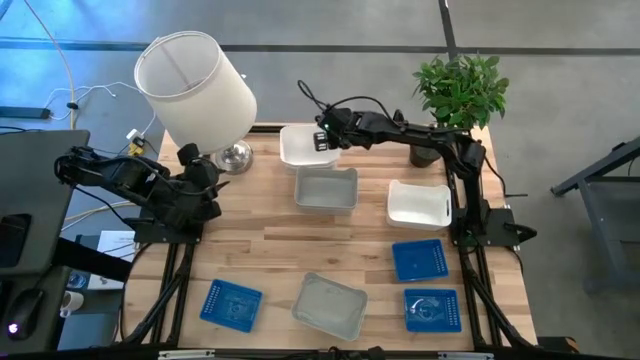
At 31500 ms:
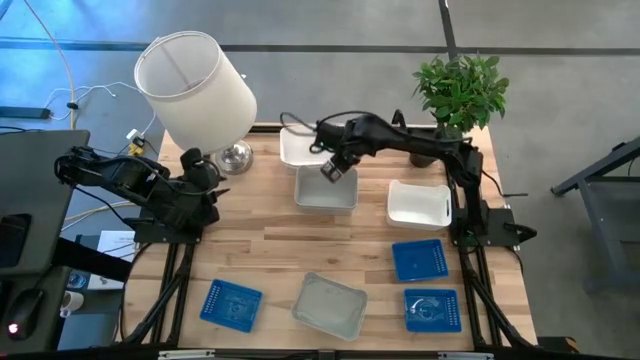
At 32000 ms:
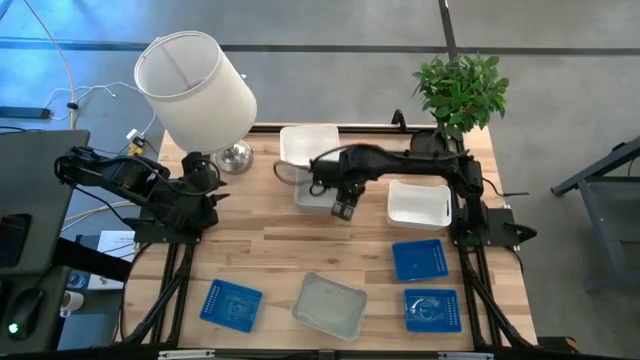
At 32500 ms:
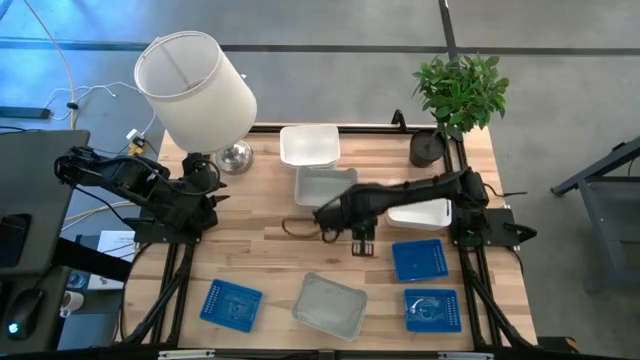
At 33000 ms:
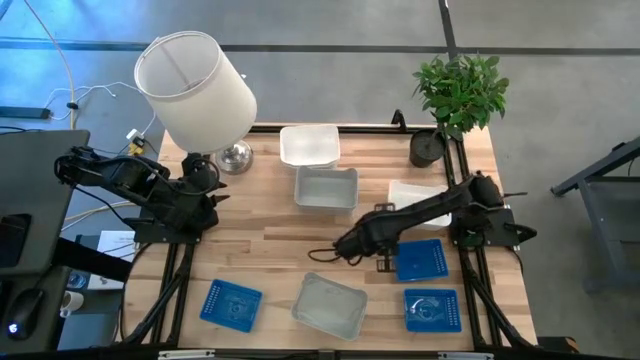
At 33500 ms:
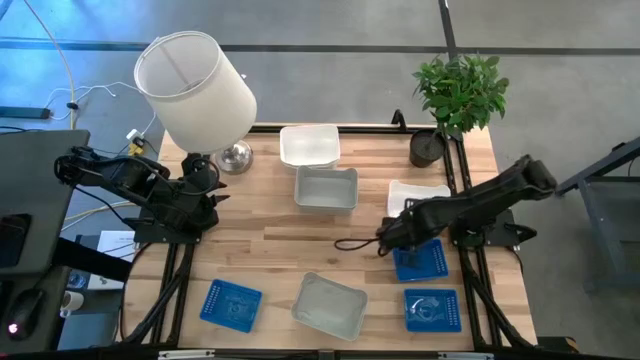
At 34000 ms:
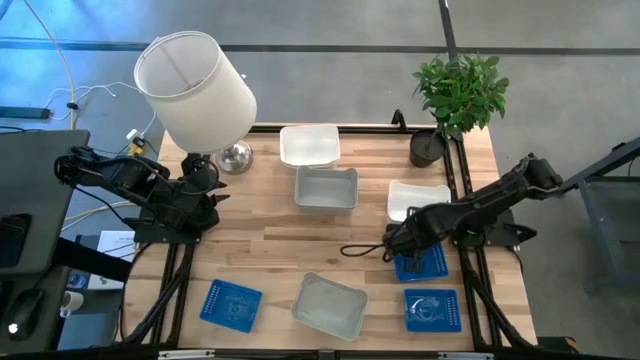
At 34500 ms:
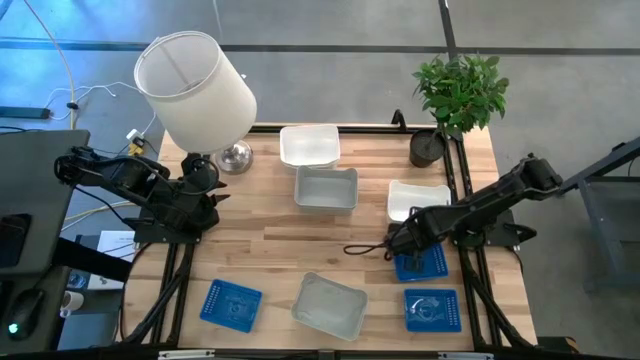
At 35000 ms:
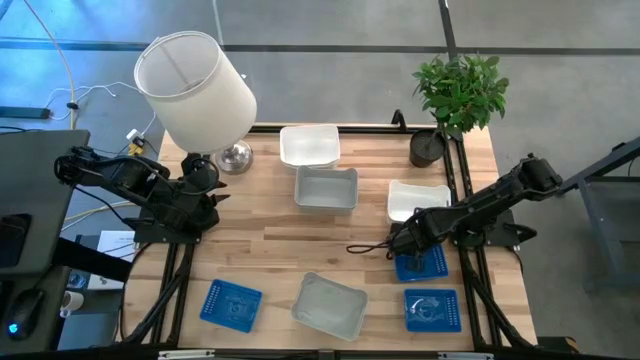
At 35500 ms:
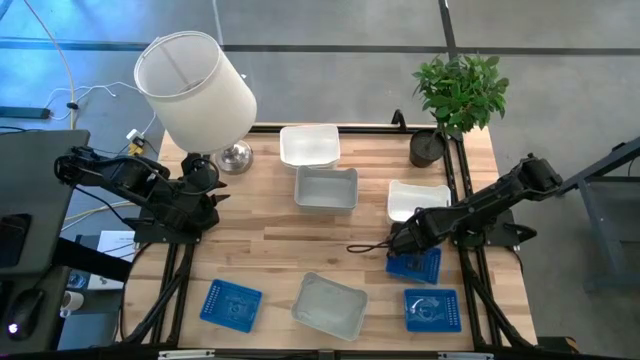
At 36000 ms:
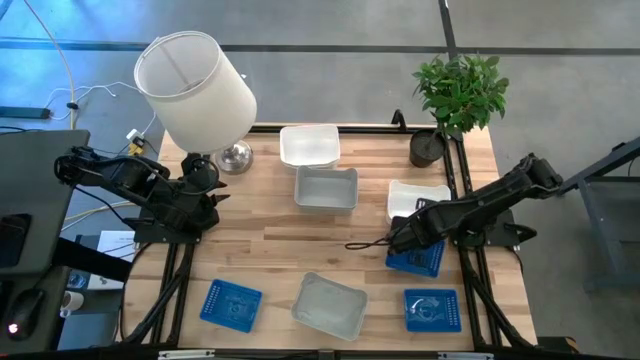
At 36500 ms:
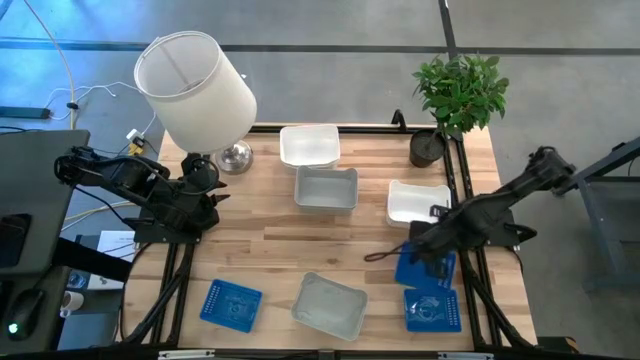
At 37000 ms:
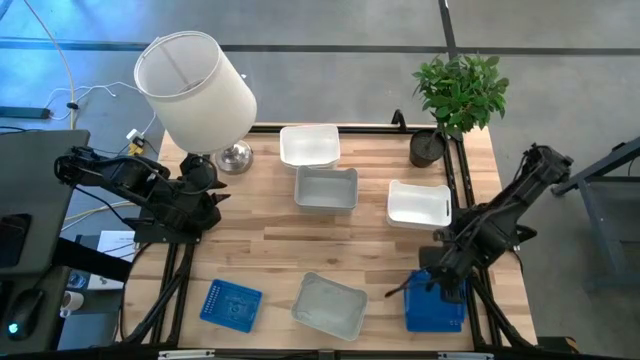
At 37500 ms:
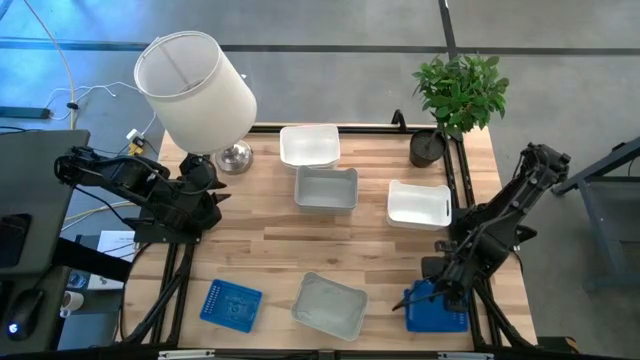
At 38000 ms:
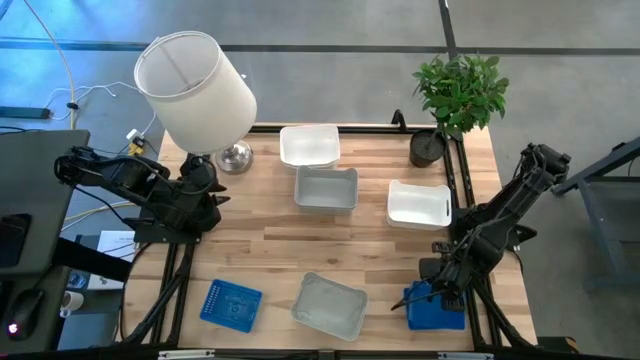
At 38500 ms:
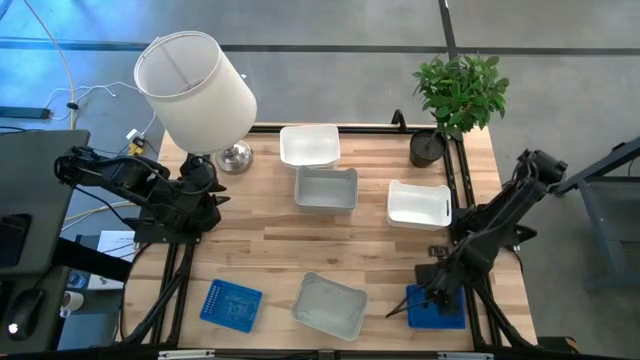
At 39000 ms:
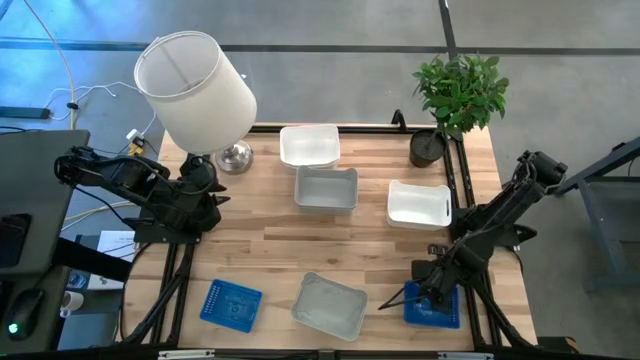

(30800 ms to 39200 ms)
Stack the blue bin on top of the bottom right blue bin

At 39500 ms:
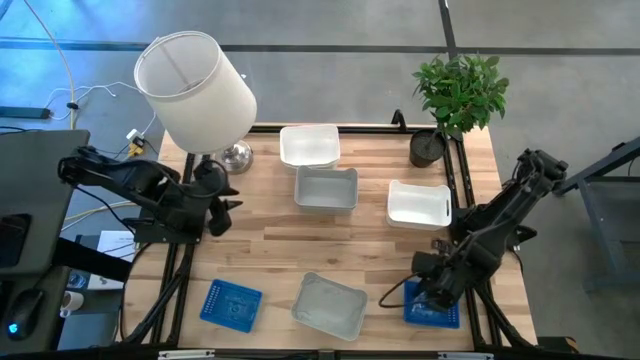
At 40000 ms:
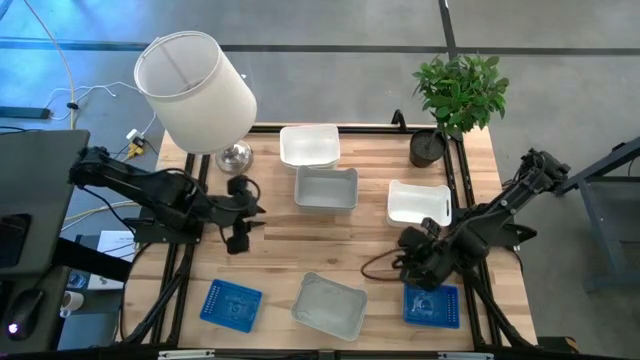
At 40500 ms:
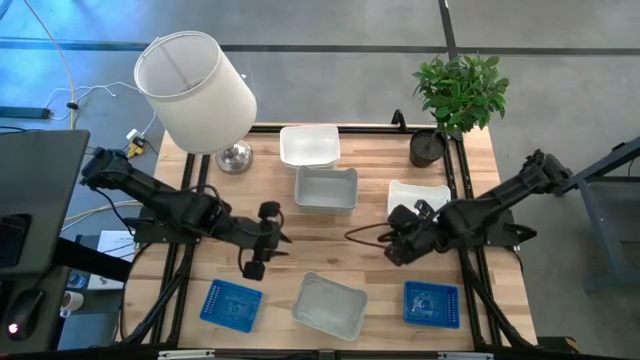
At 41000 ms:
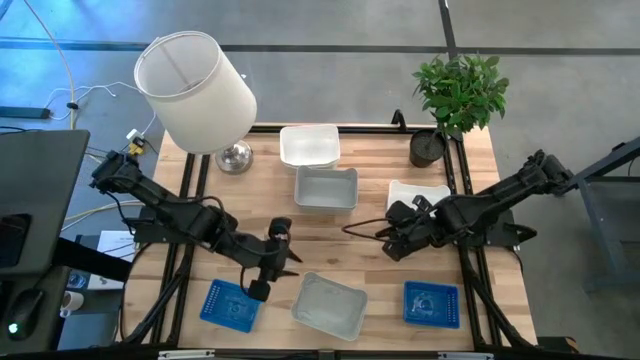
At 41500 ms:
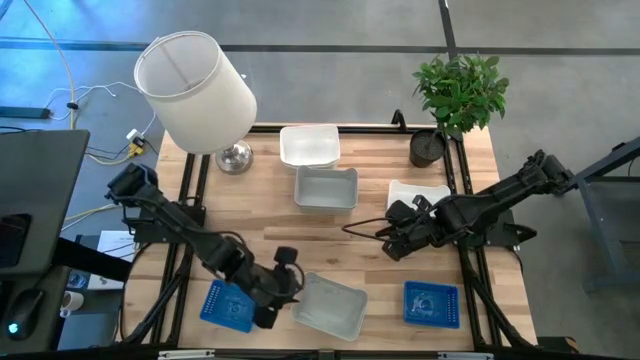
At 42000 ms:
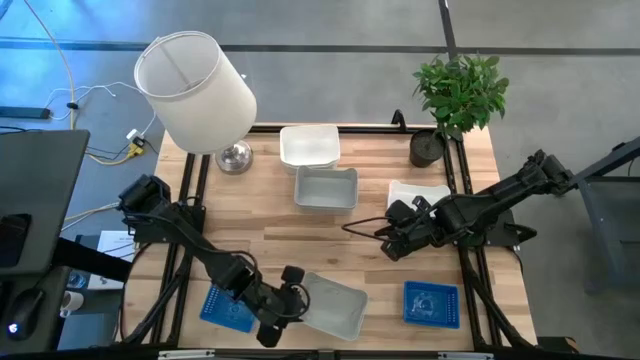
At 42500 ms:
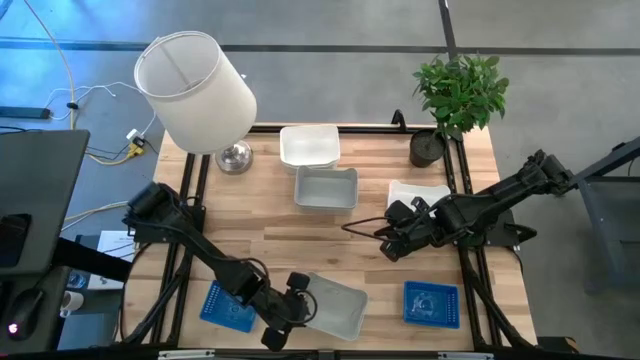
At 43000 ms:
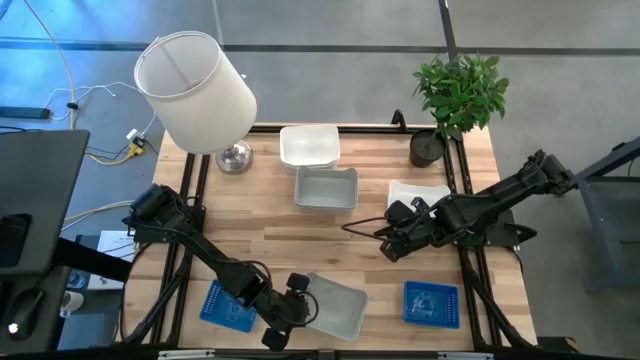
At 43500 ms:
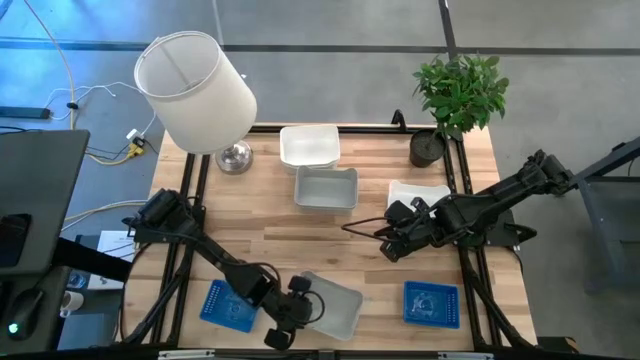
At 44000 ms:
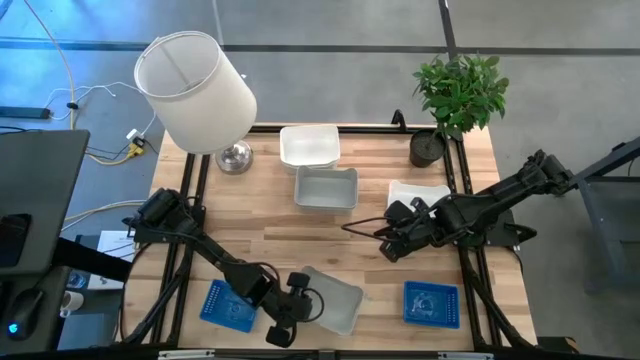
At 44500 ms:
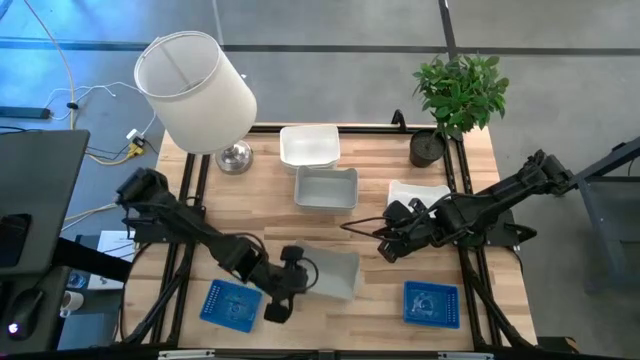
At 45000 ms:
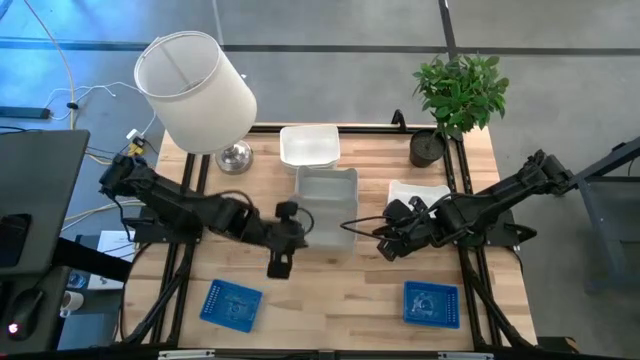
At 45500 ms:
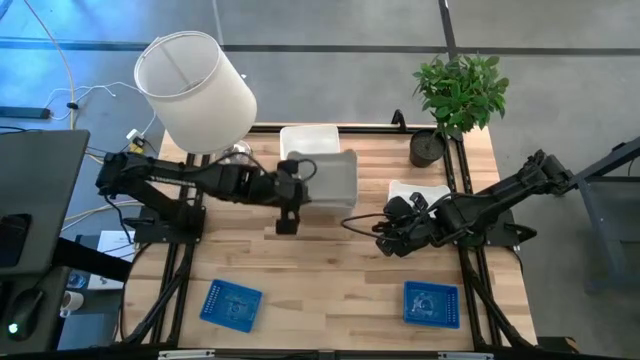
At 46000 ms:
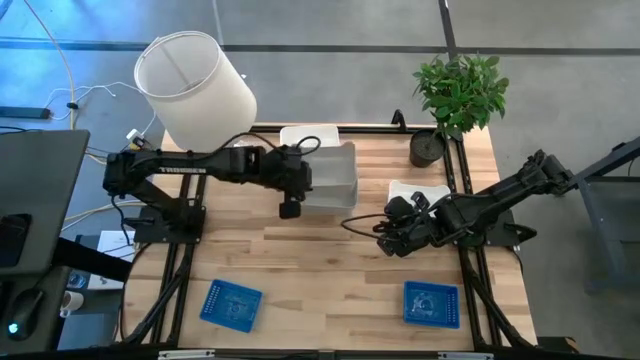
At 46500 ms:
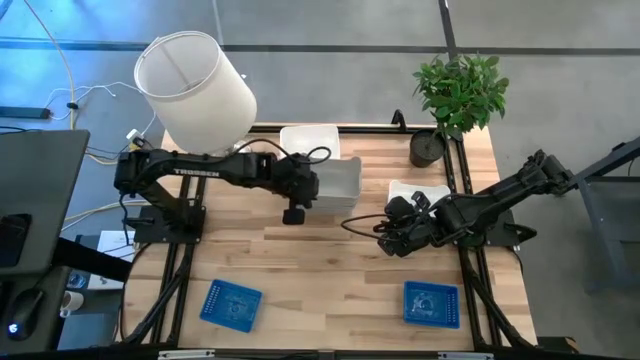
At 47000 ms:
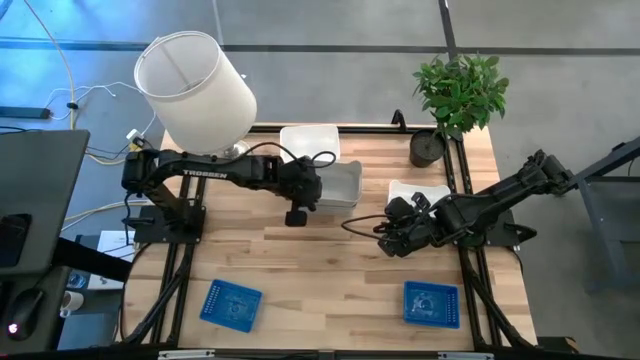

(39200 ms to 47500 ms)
Stack the bottom gray bin on top of the top gray bins

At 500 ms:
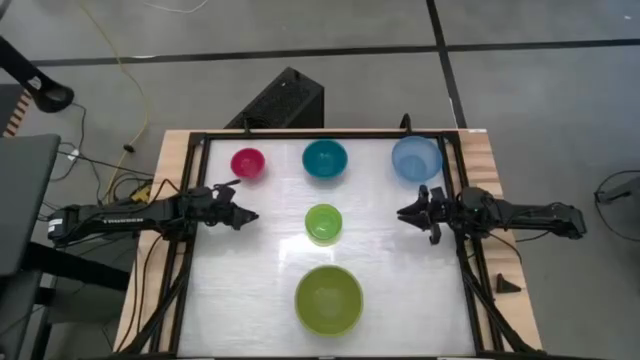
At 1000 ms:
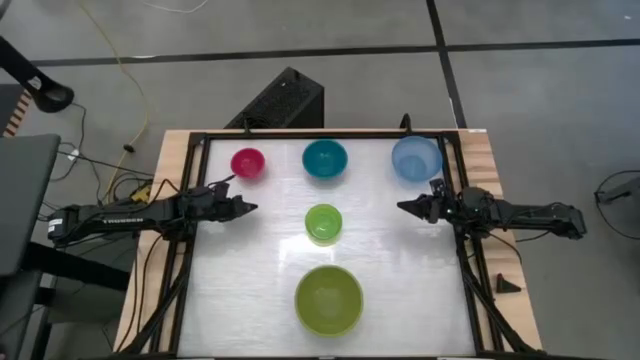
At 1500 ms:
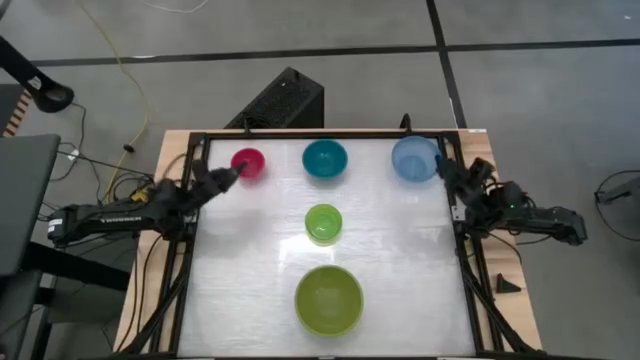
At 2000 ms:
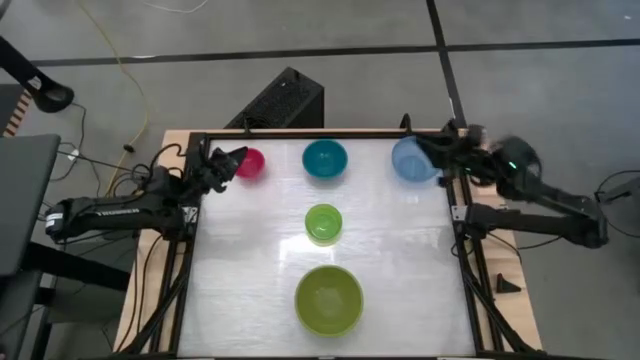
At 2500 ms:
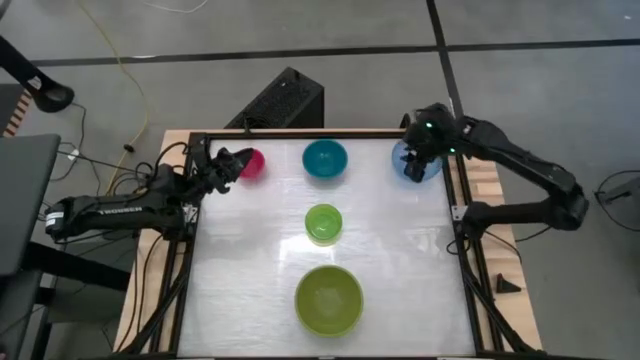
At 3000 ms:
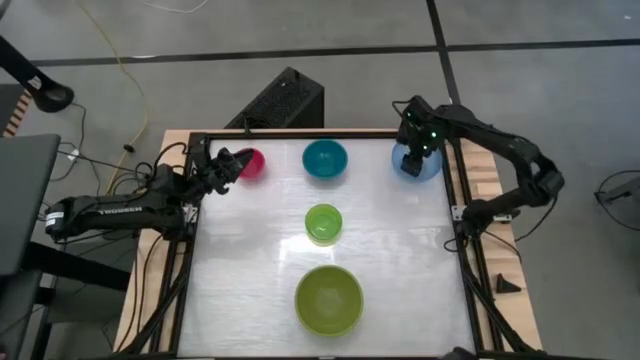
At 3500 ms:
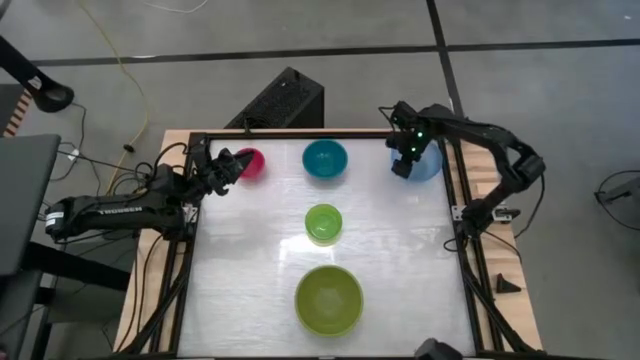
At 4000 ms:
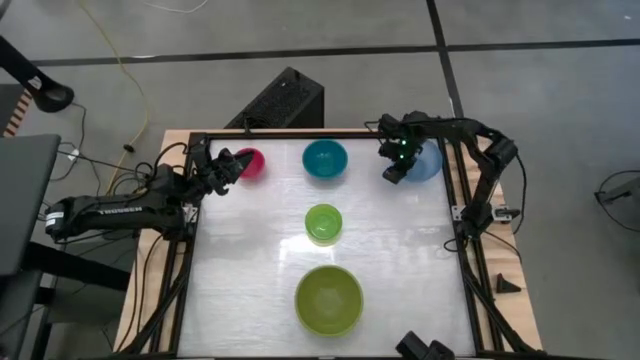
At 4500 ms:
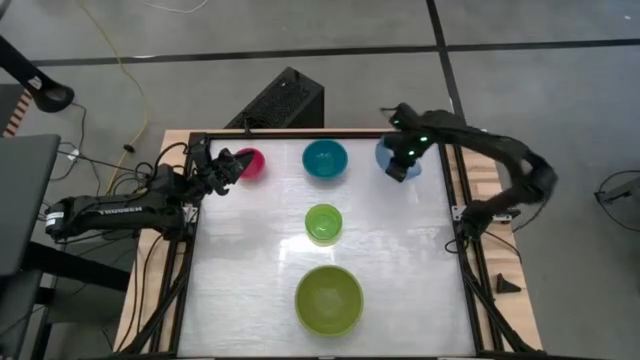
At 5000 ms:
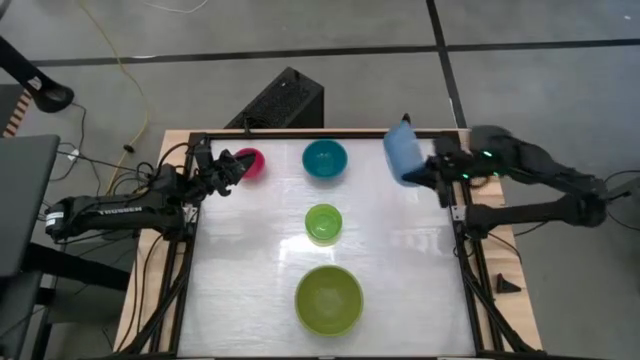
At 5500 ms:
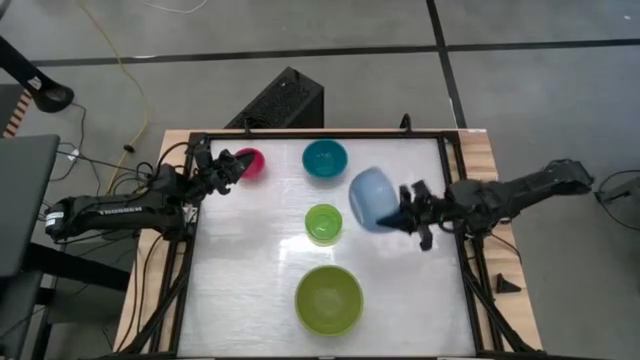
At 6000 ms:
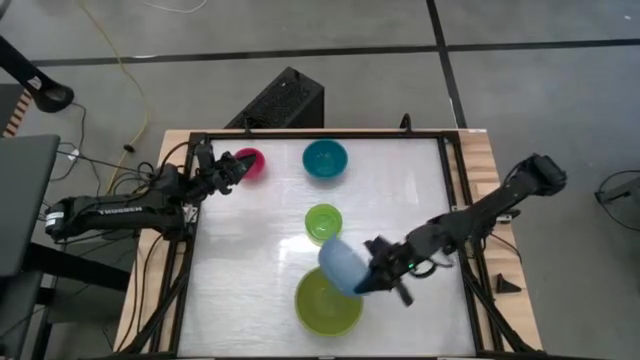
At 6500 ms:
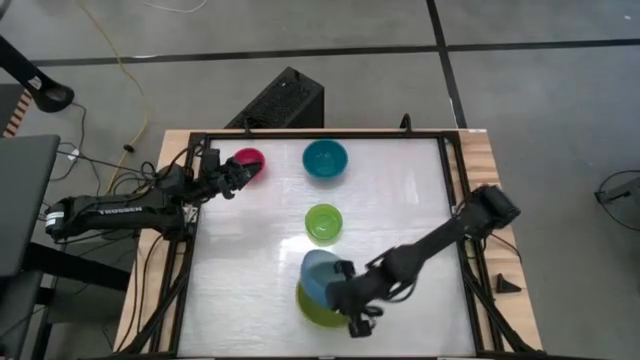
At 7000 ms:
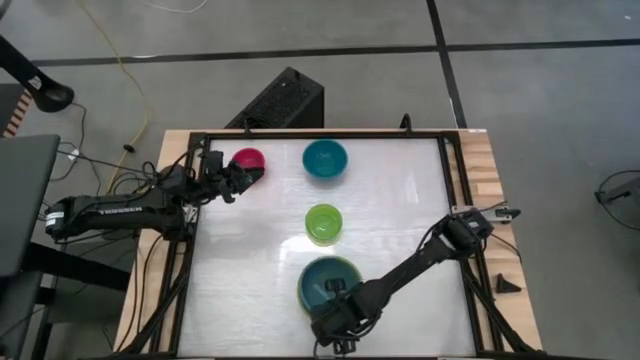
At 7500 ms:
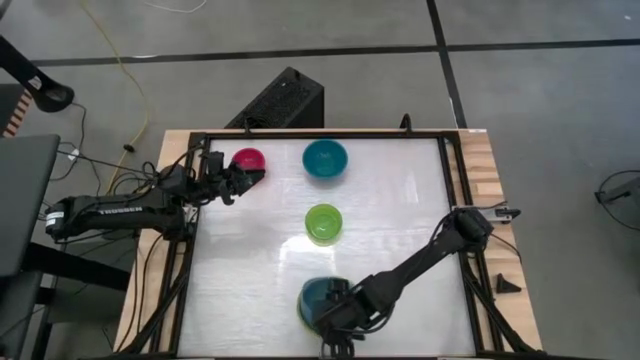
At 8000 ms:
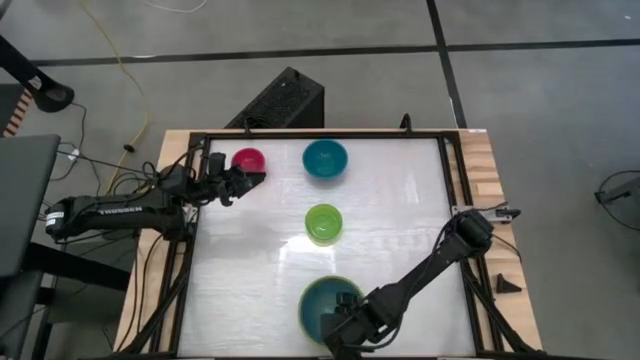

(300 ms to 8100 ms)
Stack the light blue bowl into the dark green bowl
